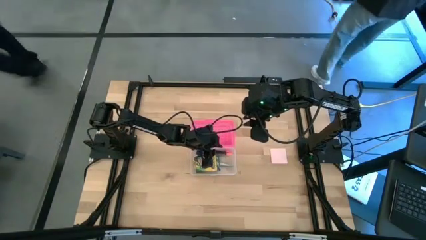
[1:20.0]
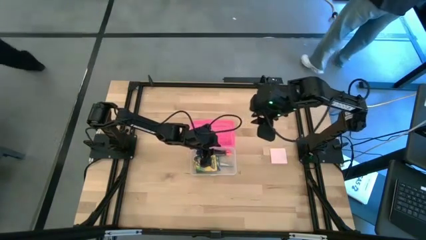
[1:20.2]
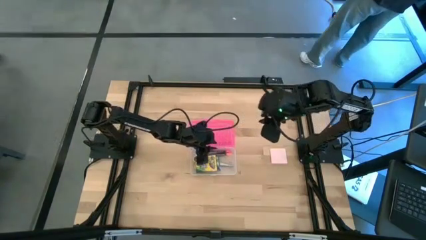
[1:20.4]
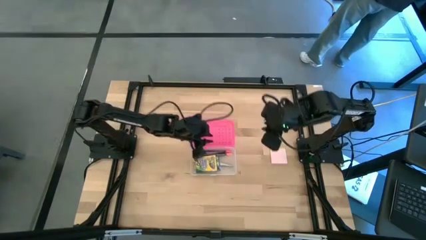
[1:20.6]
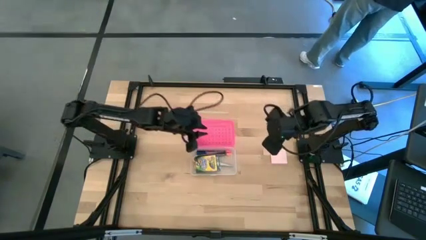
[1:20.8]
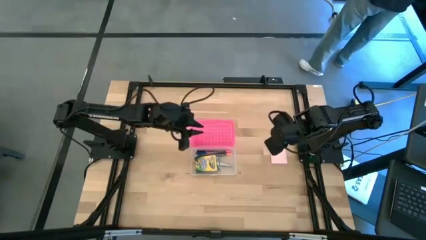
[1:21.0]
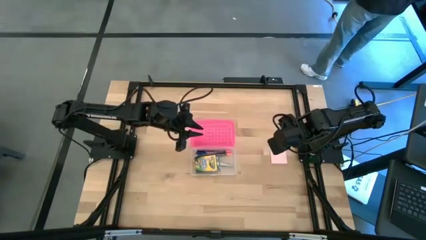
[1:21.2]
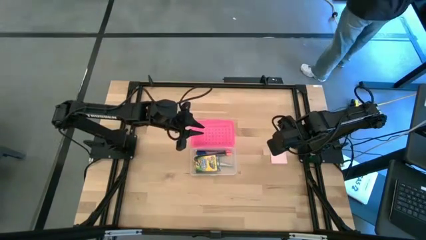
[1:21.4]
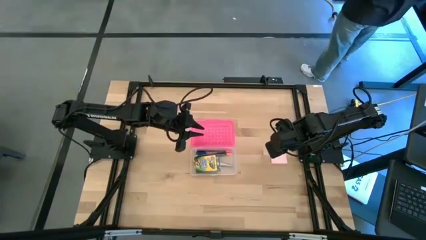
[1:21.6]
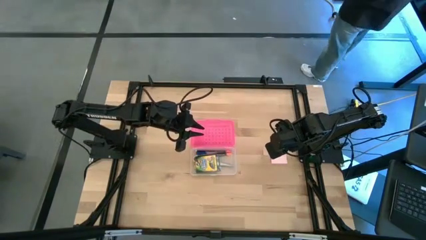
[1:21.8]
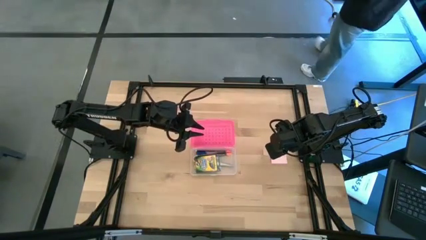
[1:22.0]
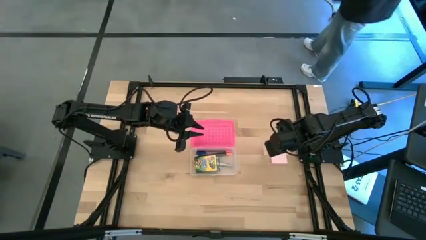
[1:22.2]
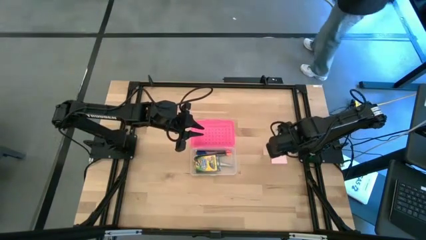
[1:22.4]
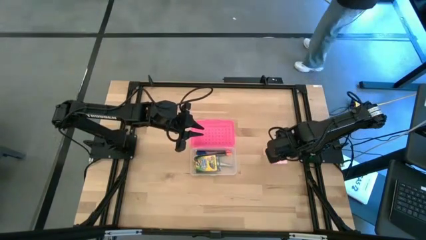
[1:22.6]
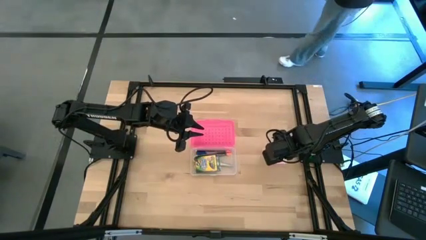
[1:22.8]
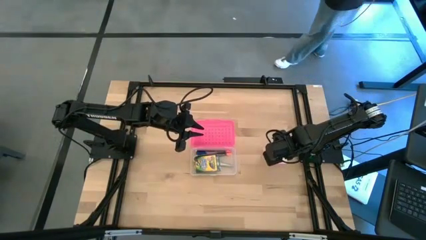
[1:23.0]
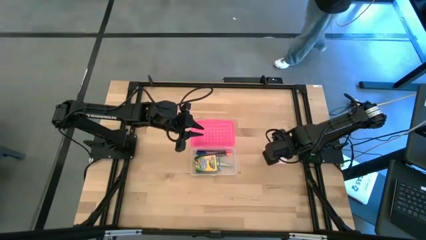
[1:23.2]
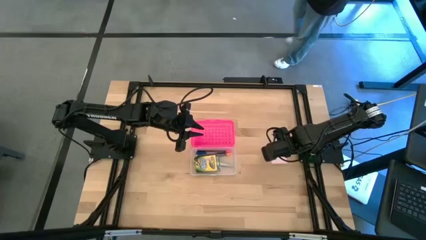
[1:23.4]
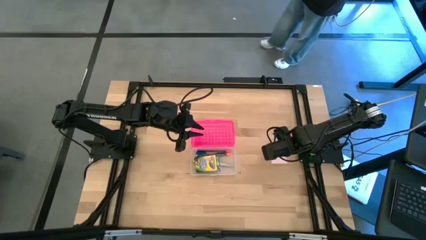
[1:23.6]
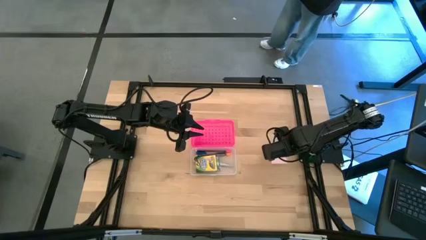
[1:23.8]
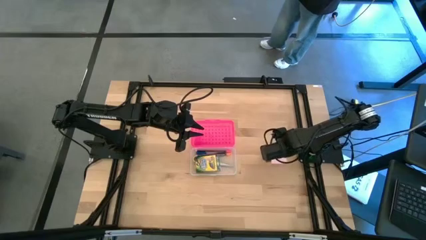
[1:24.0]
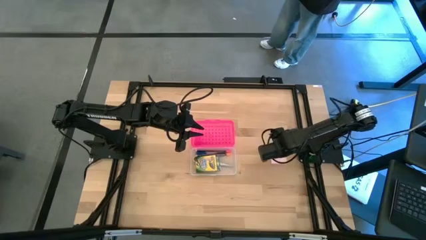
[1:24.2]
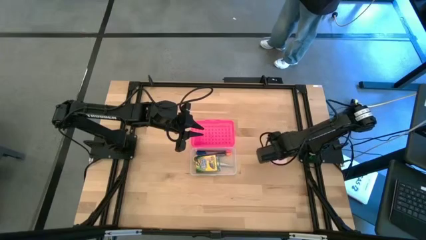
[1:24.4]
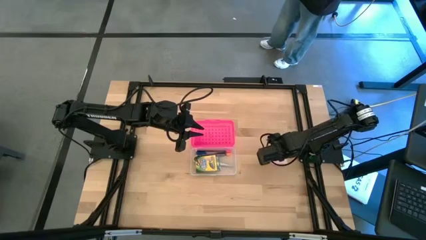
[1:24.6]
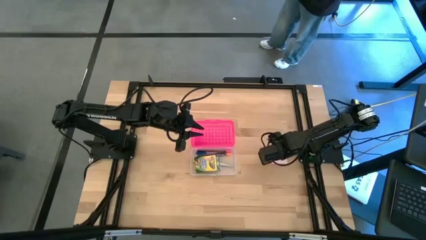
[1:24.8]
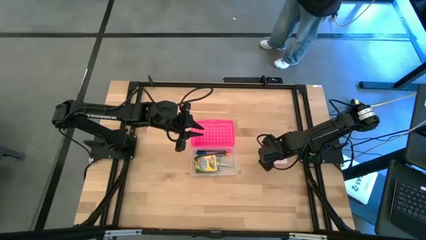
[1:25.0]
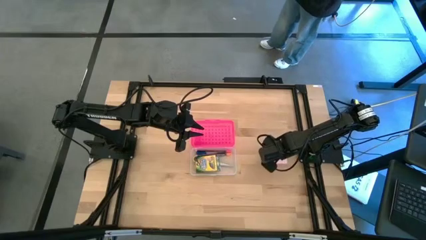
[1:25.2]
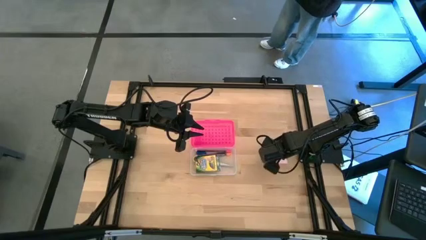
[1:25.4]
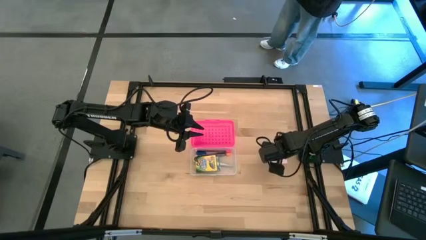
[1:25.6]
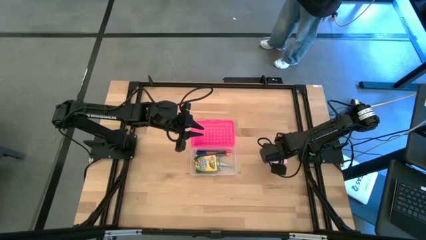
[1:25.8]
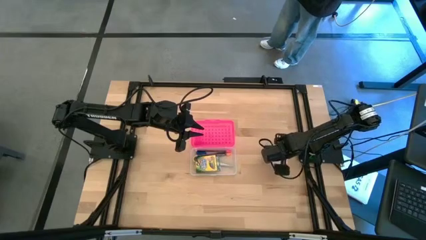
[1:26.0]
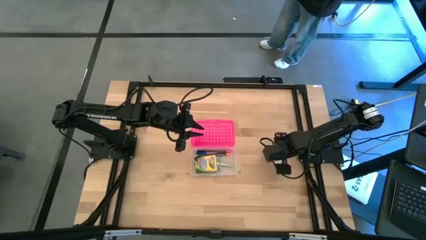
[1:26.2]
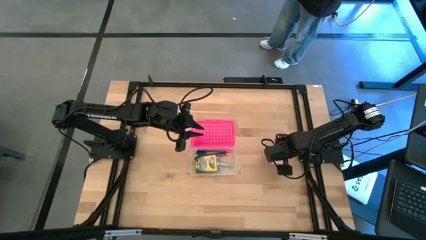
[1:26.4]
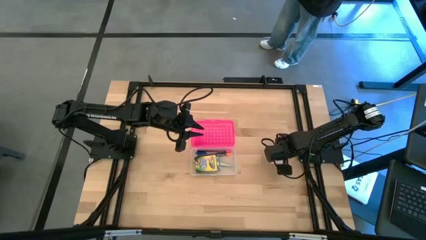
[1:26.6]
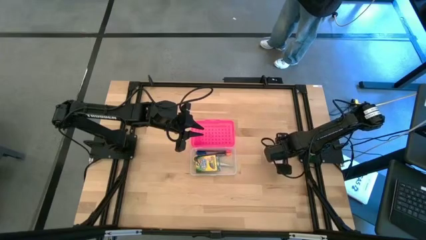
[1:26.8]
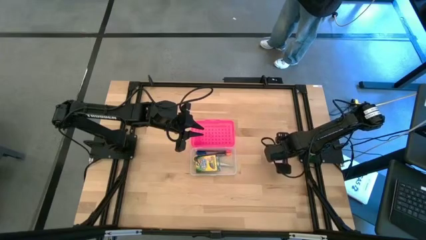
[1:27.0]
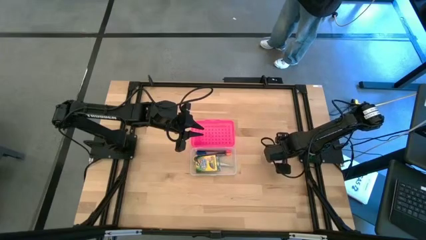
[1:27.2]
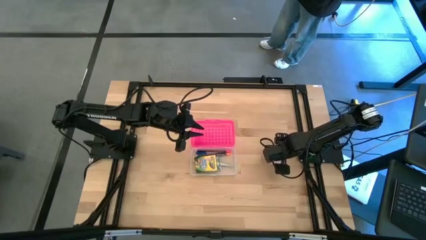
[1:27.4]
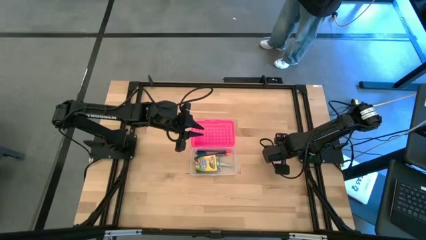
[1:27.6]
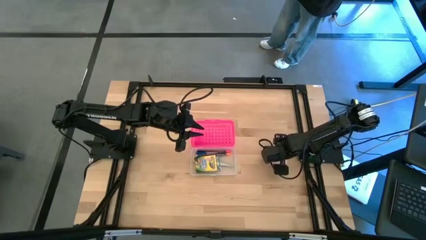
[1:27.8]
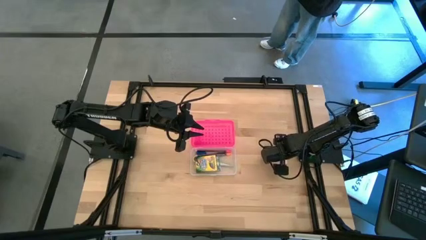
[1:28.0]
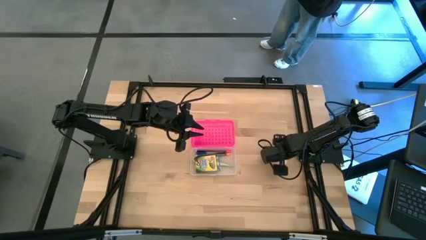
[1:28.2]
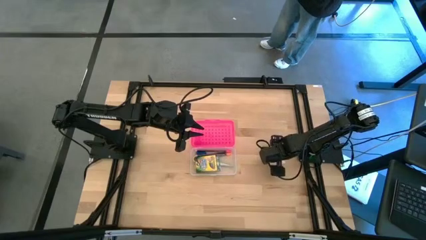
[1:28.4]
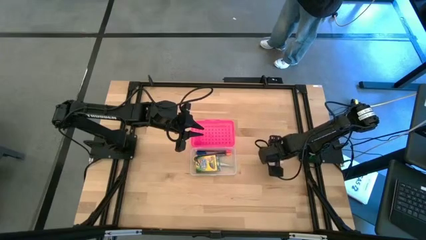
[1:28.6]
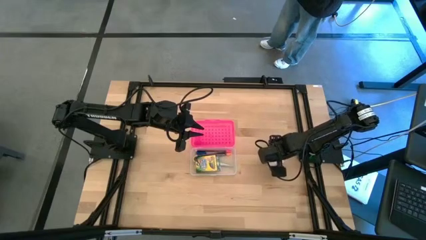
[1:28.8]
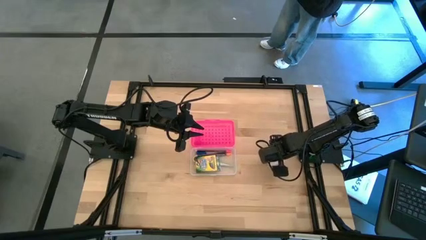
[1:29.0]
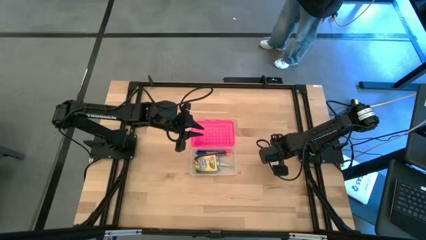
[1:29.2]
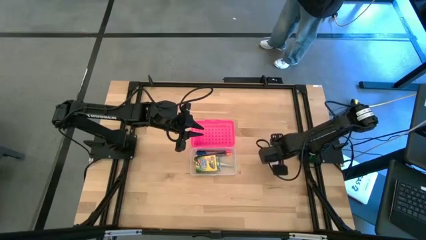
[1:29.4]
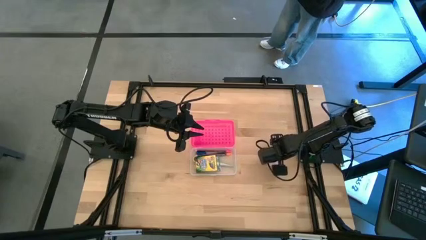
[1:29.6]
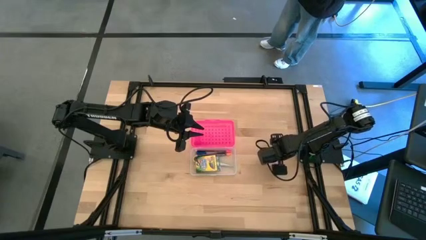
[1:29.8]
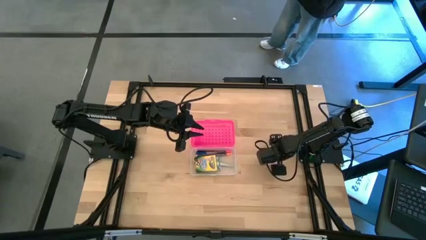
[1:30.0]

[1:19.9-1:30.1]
Task: Pack school essentials
Put the sticky notes into the pencil case

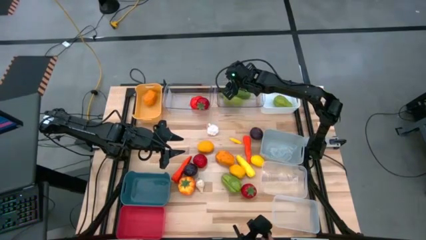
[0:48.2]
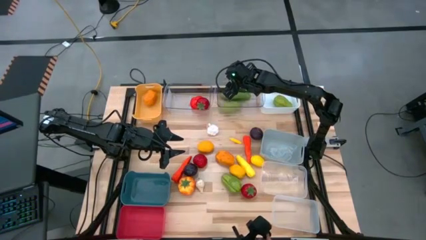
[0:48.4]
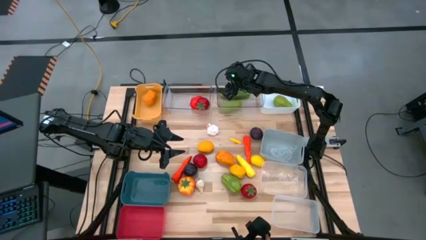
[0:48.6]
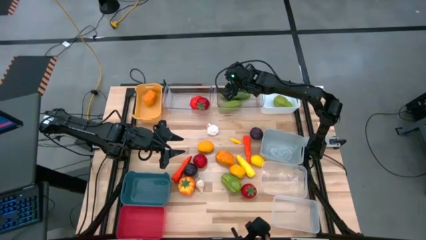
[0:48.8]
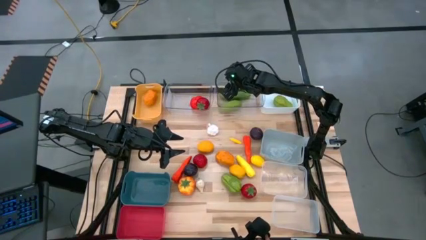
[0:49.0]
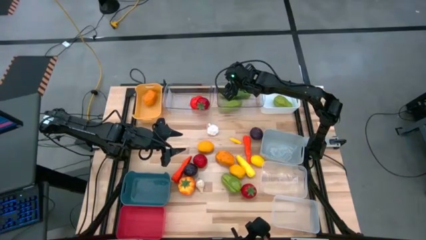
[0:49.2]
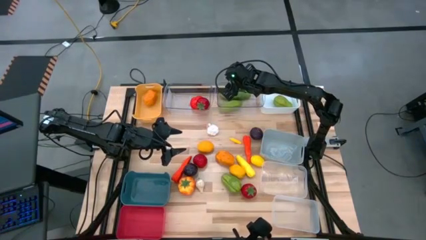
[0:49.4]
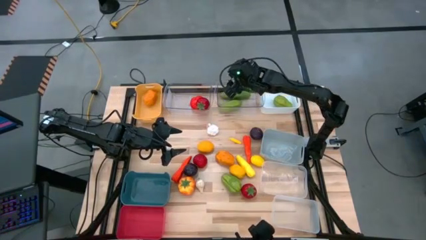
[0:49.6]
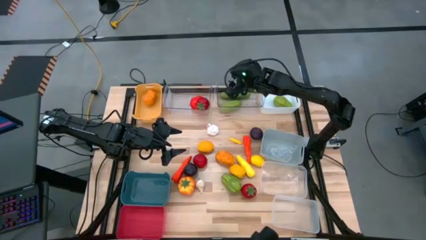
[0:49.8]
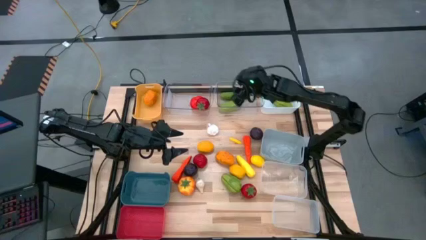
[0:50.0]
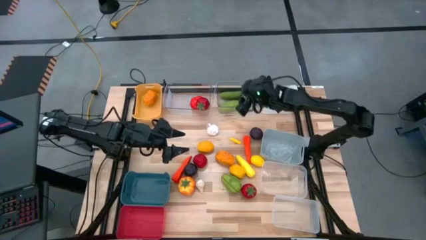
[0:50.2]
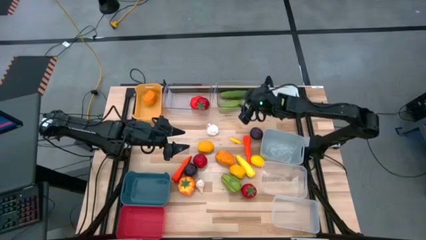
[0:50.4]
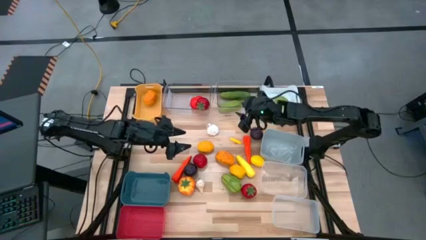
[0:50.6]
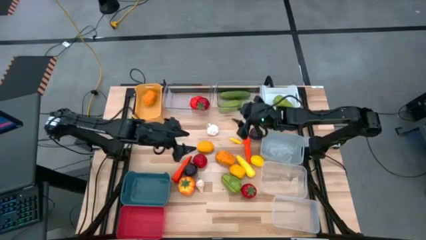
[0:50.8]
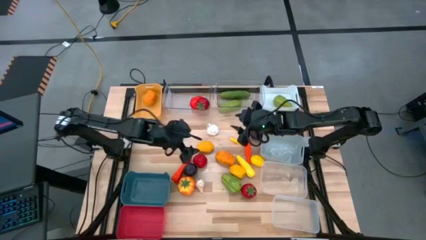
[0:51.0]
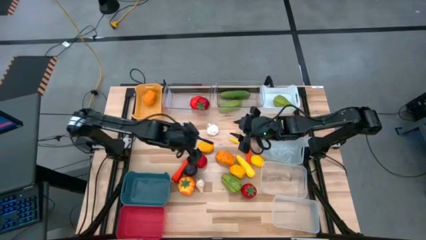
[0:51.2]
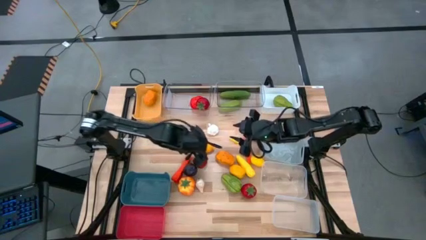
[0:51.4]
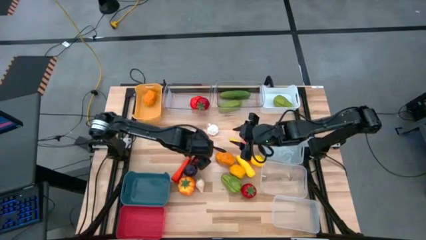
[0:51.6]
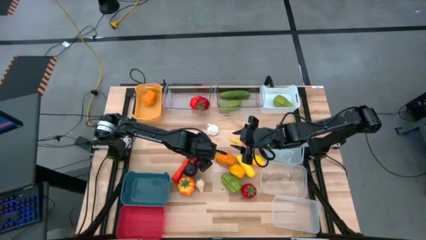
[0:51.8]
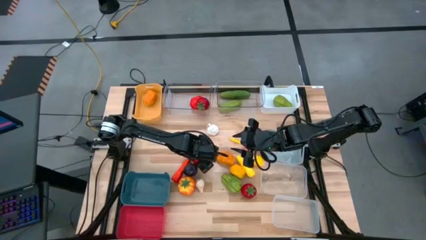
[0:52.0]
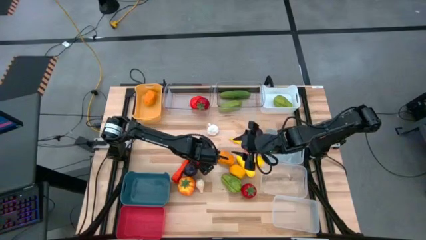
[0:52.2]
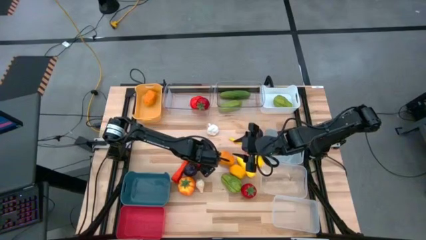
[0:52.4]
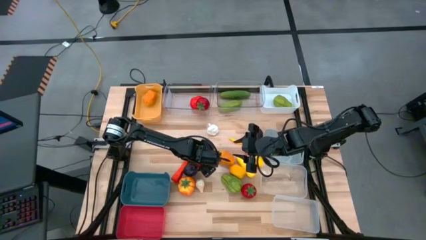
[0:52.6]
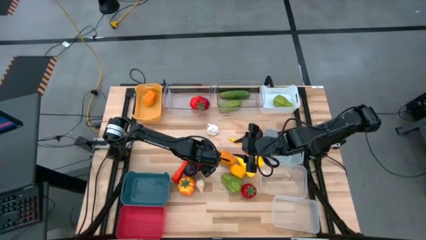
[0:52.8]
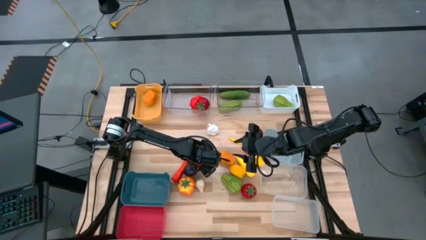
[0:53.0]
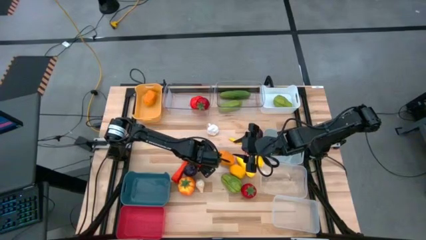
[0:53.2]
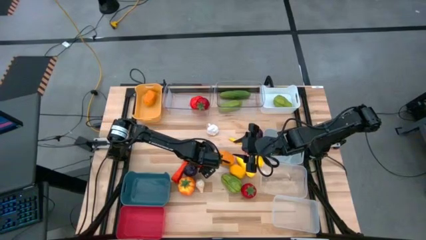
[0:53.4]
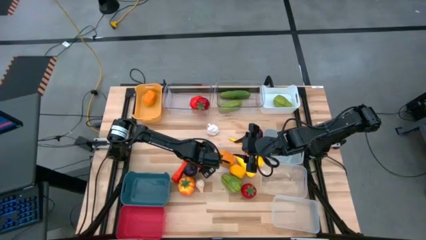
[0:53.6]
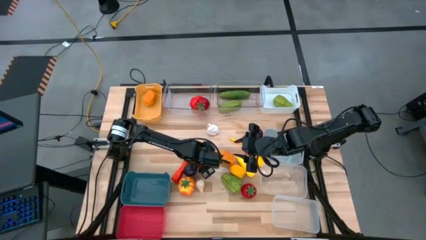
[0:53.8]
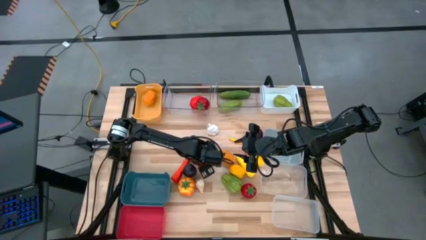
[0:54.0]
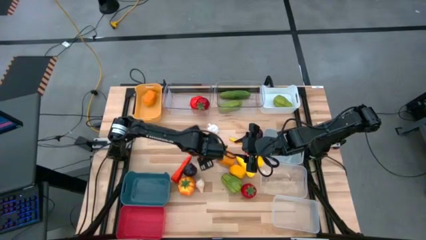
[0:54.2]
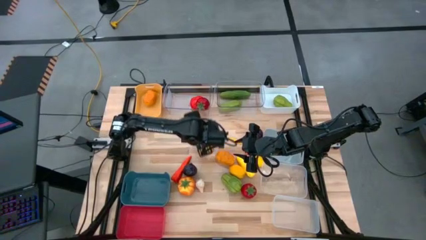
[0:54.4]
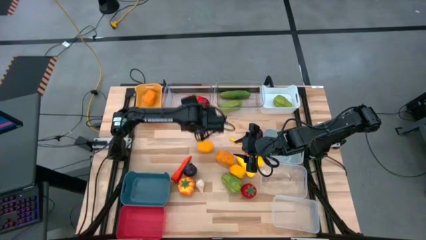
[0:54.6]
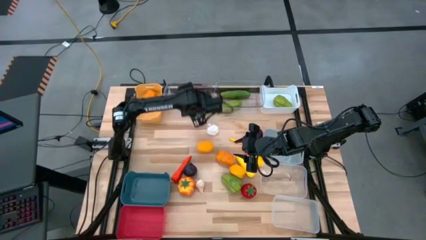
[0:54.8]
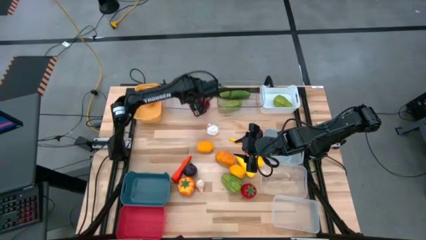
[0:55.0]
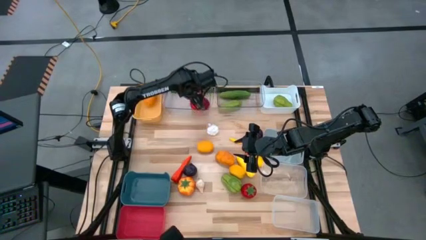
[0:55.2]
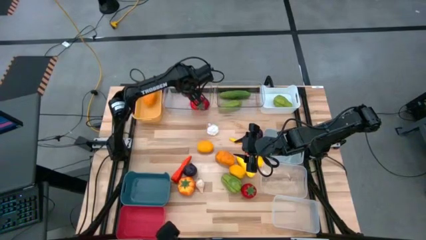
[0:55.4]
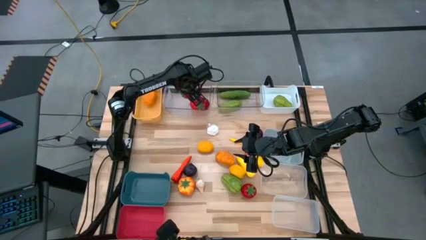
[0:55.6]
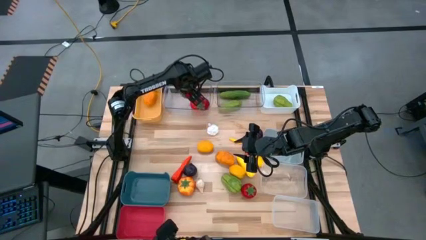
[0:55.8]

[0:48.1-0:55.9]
Task: Sort produce into baskets
Put the red tomato into the left transparent bin
